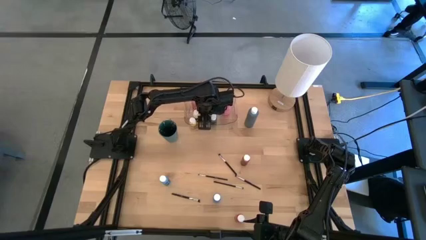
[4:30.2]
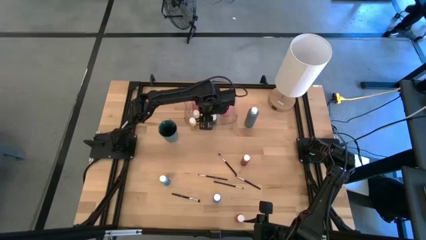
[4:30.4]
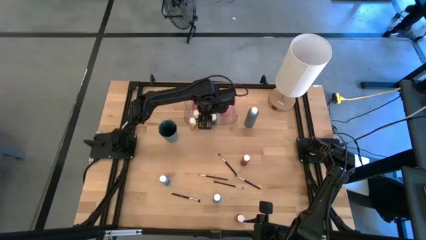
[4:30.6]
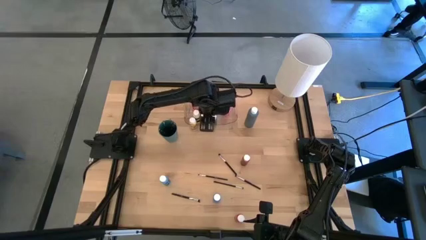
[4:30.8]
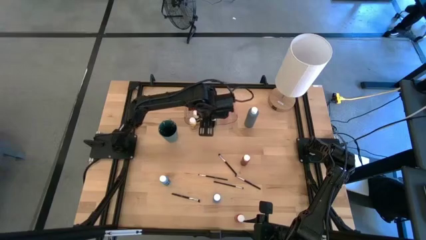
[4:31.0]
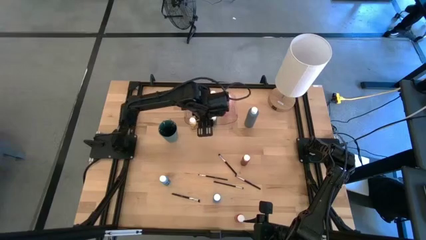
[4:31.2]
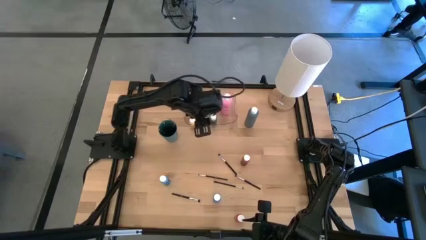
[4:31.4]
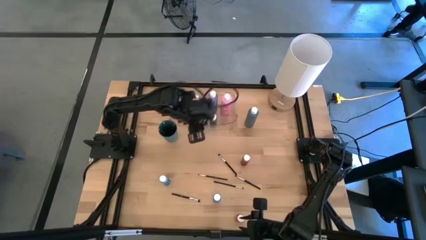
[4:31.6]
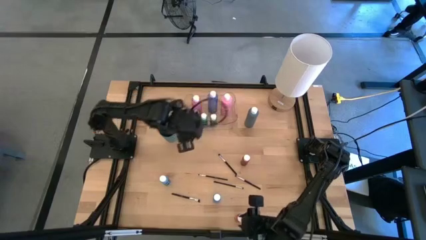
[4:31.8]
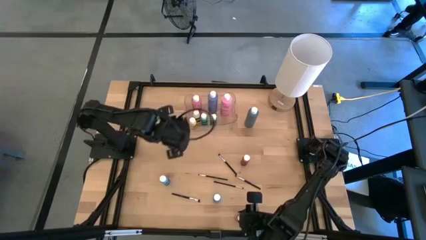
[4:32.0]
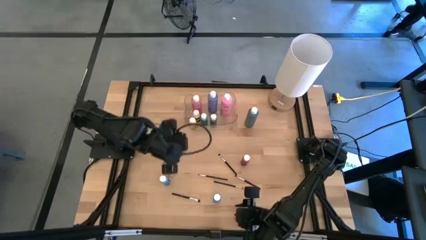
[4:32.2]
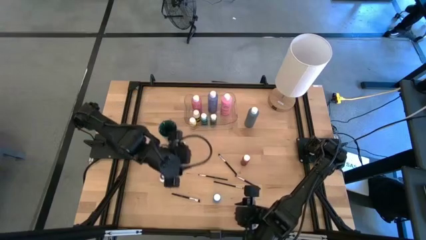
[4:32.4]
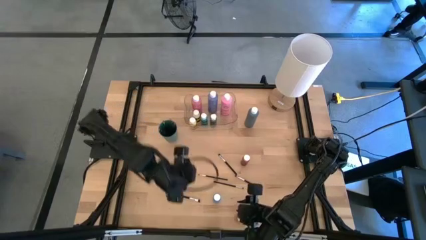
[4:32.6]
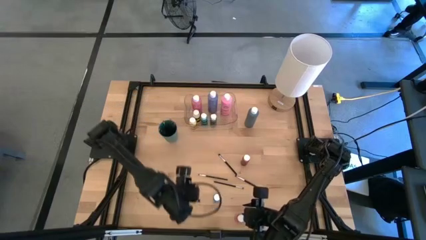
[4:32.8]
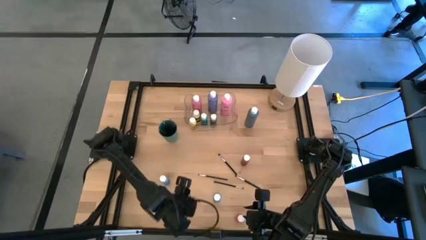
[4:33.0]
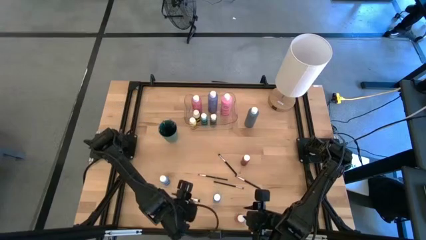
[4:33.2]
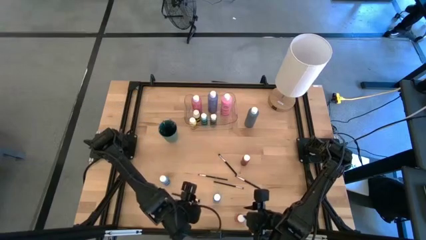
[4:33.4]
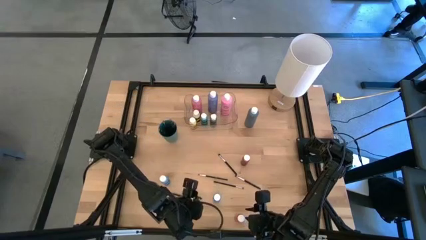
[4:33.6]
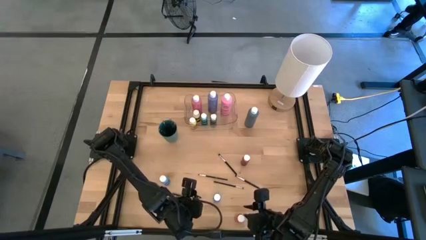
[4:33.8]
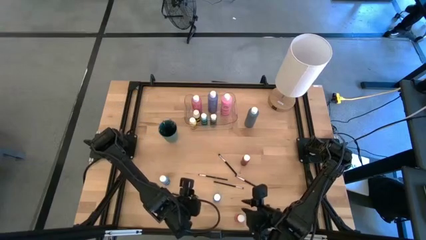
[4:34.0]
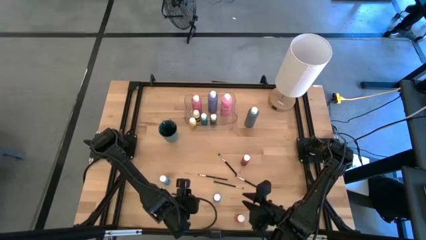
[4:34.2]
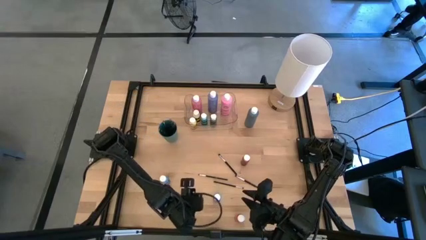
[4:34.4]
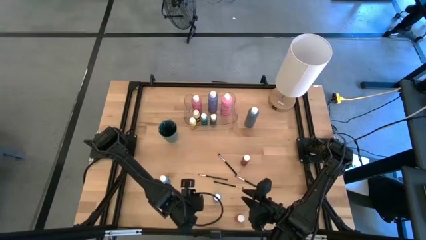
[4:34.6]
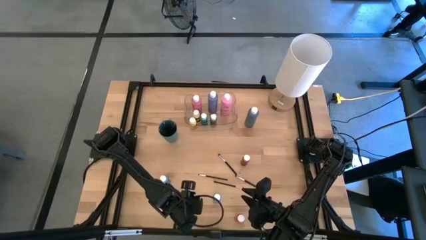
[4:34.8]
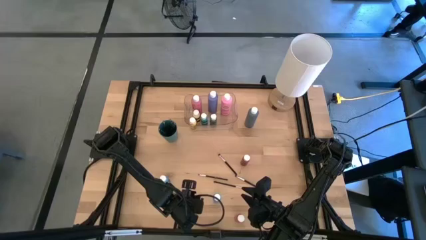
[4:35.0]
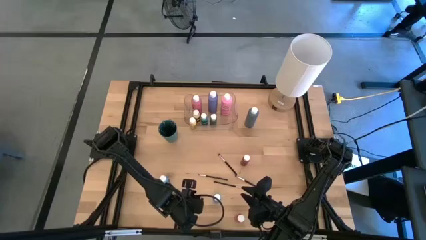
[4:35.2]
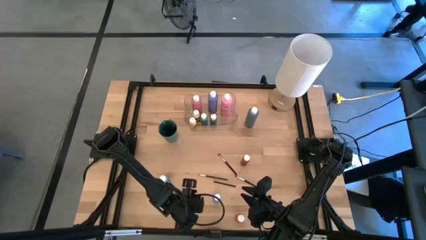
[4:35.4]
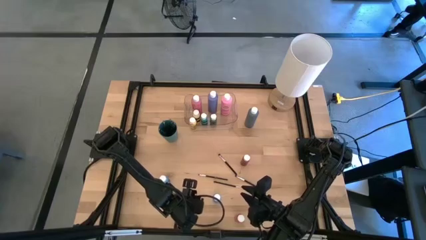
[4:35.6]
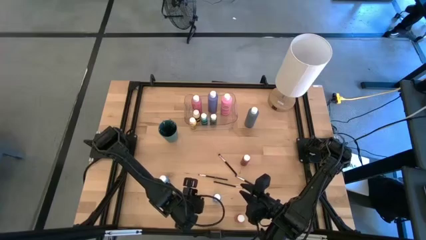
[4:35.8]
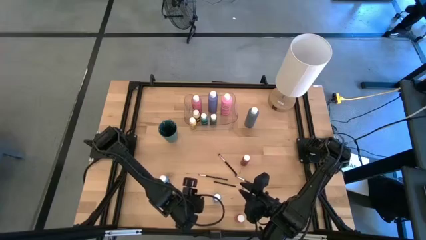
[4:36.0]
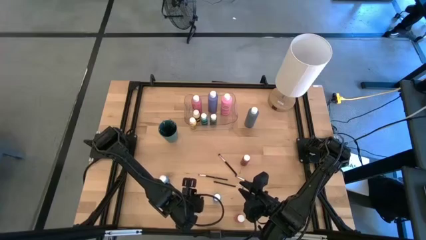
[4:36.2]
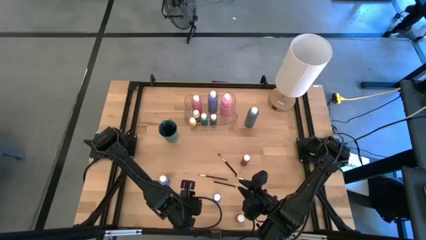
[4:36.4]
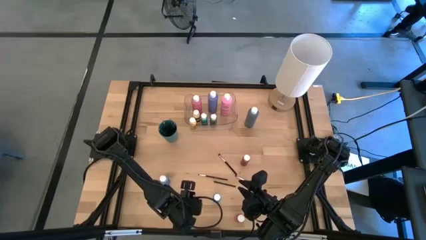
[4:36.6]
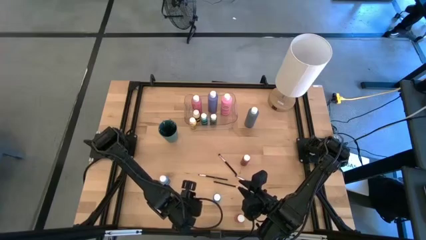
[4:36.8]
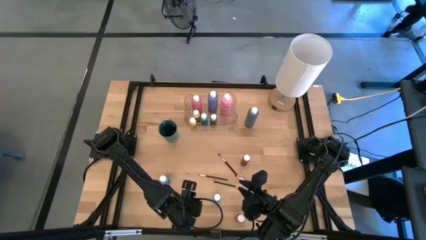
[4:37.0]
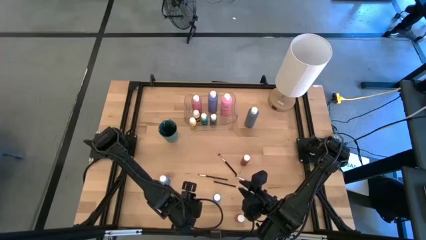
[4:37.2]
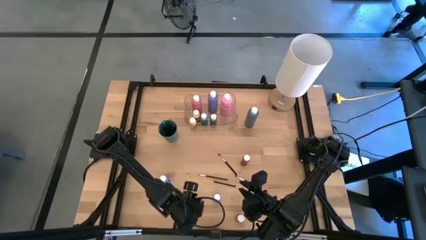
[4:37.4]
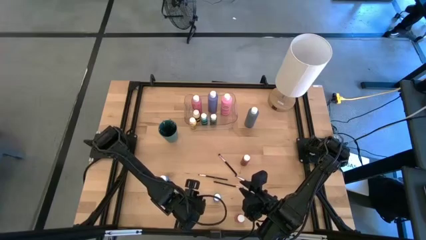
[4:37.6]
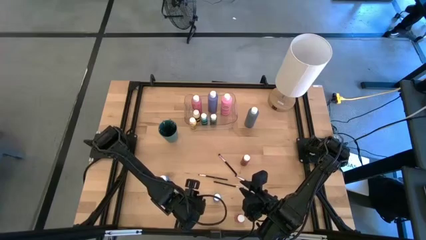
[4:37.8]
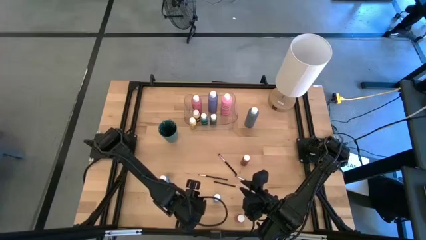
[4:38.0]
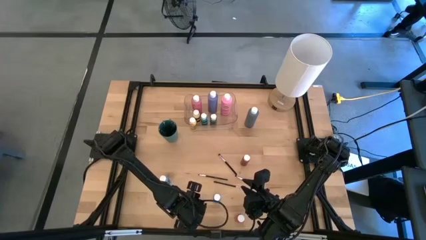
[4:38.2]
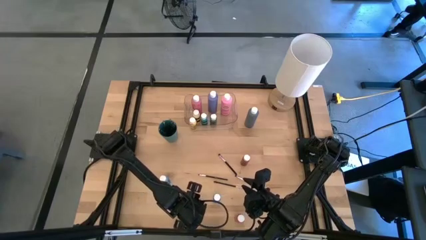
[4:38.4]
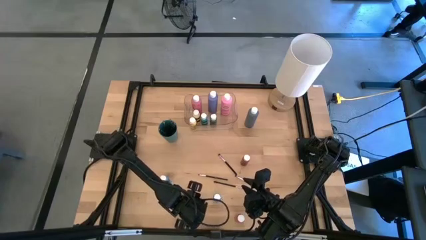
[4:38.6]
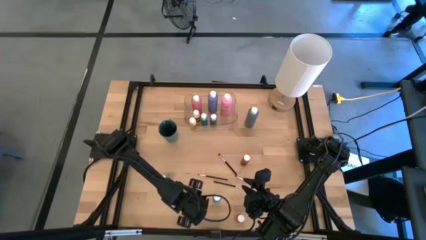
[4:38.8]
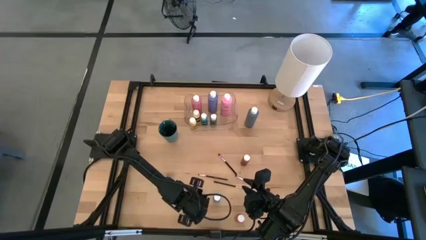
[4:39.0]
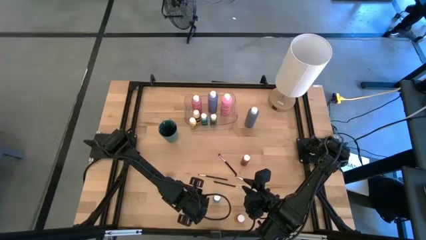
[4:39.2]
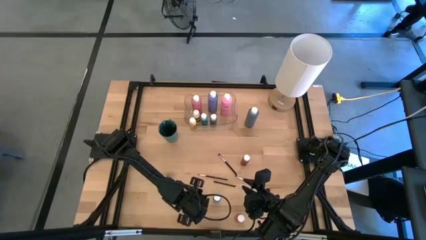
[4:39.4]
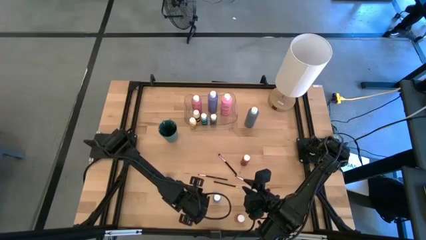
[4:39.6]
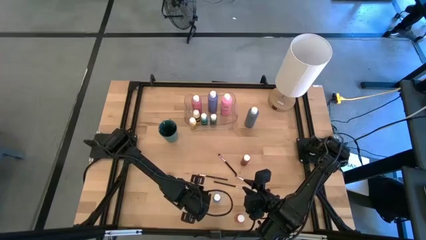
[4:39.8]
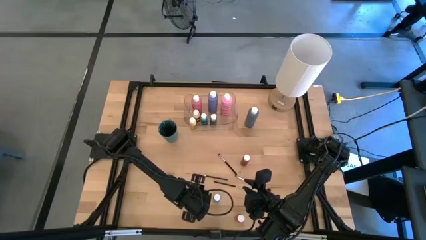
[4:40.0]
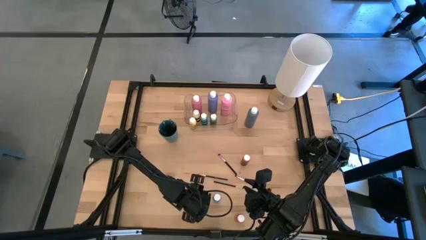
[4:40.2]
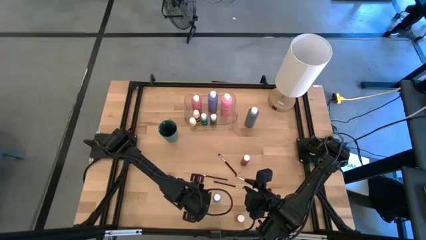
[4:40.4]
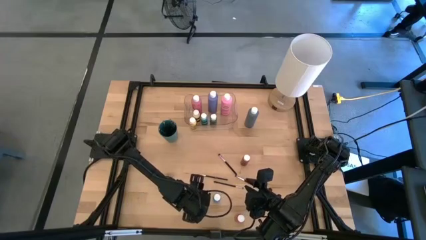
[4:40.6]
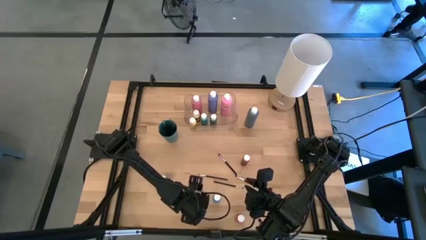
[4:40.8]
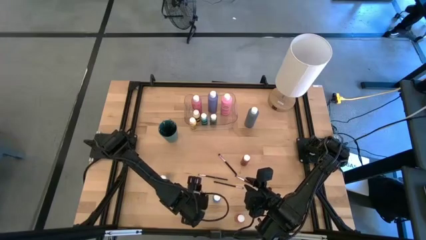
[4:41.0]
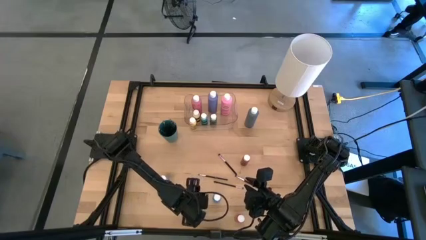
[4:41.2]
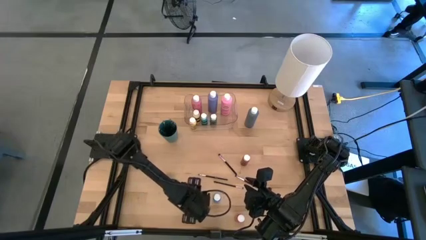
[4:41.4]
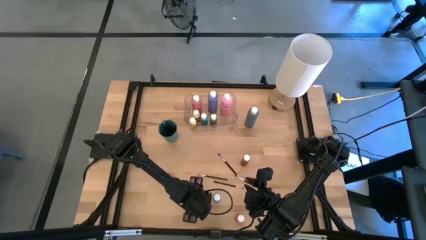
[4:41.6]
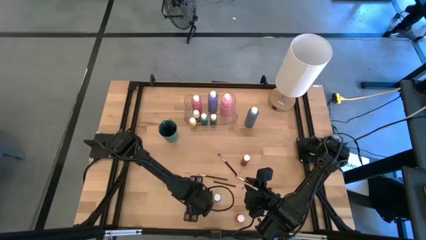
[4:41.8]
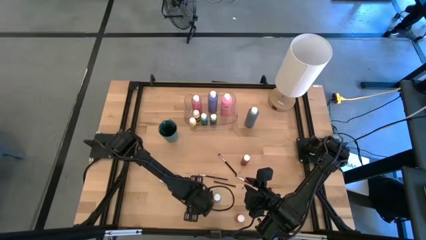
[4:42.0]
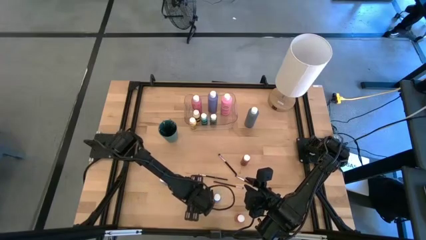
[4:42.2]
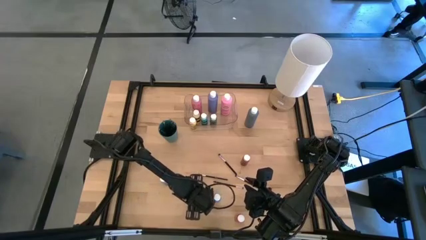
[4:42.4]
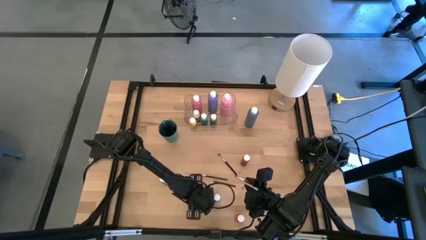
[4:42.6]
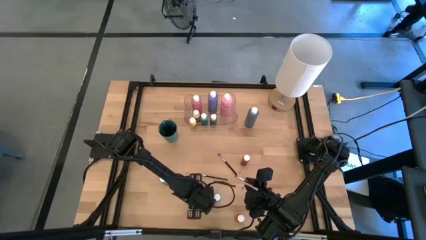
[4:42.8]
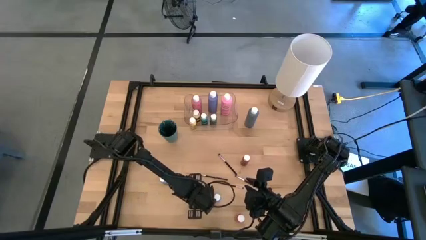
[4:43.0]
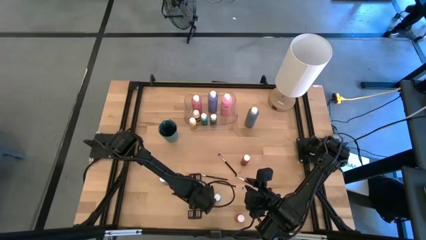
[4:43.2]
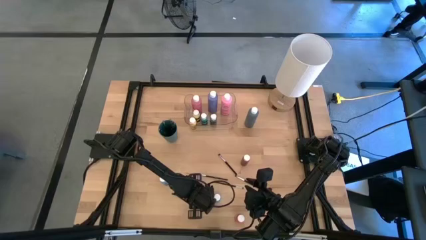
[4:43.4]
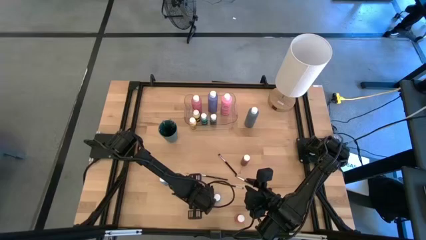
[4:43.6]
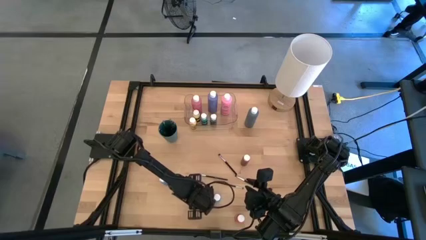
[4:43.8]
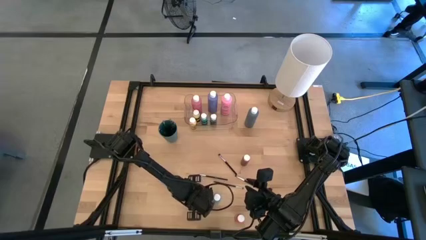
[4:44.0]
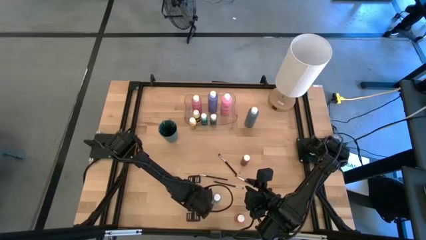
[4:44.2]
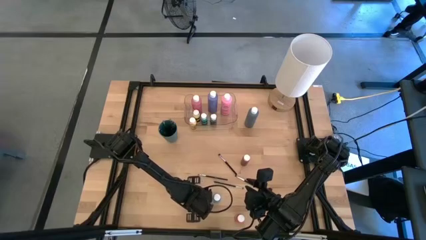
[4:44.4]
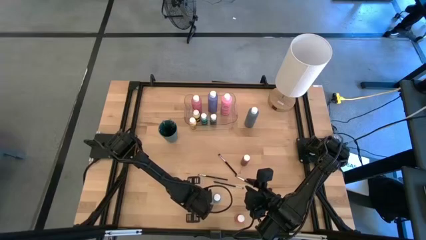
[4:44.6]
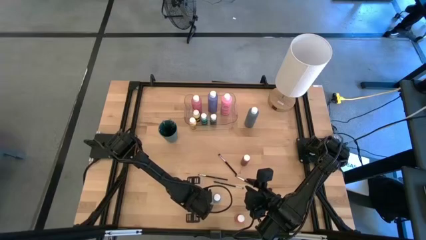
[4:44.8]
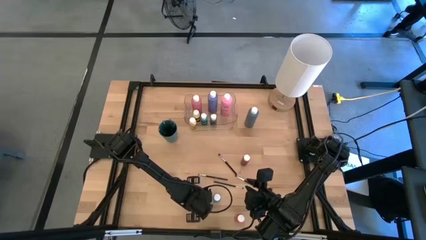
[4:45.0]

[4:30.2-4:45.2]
Task: Pick & Place Paint Supplies
Put the black paint brush into the green cup

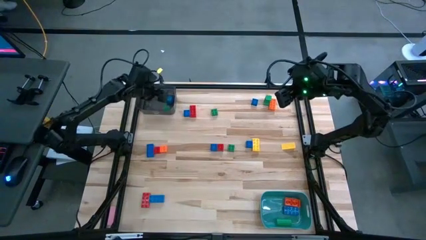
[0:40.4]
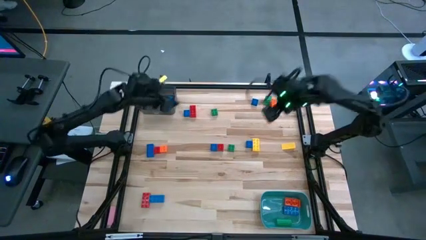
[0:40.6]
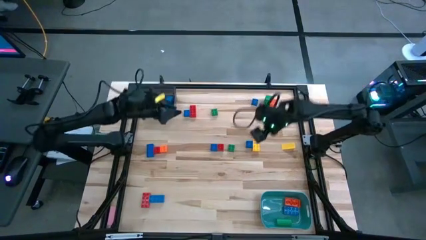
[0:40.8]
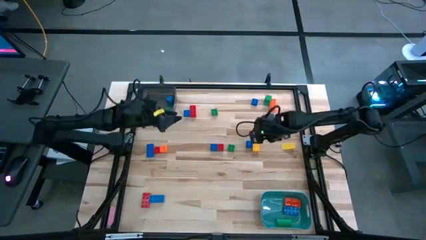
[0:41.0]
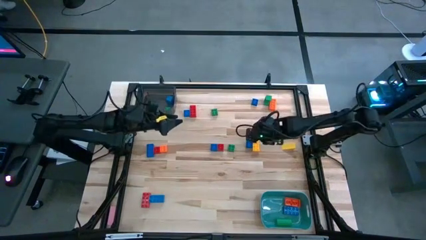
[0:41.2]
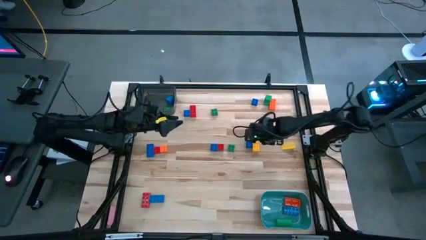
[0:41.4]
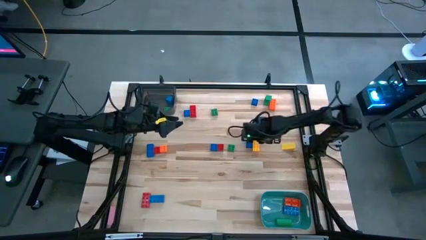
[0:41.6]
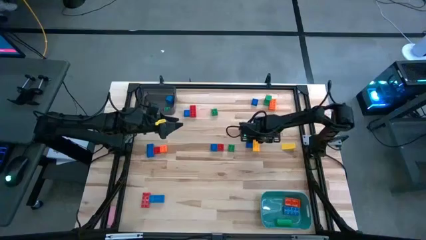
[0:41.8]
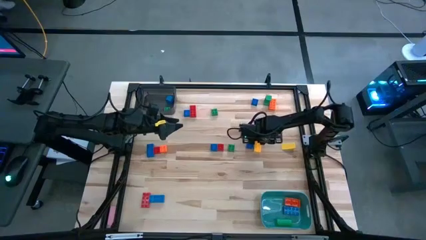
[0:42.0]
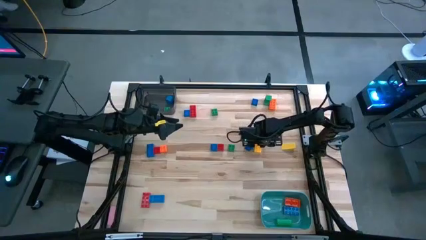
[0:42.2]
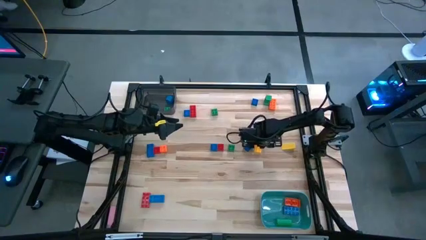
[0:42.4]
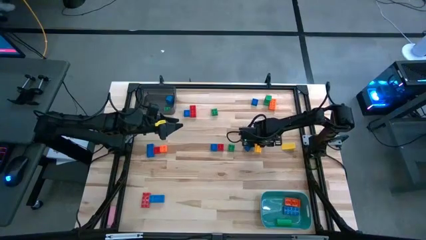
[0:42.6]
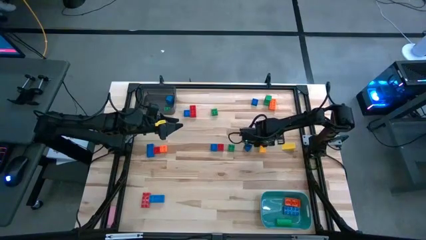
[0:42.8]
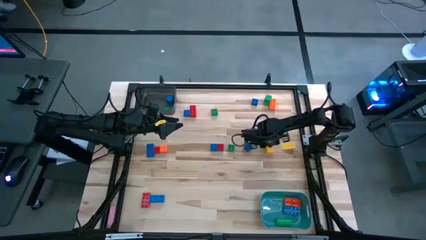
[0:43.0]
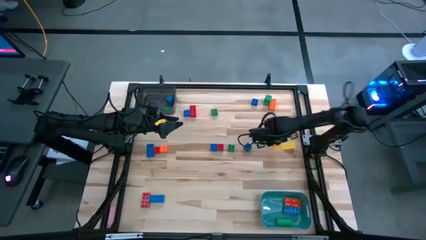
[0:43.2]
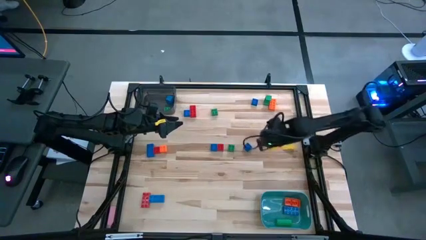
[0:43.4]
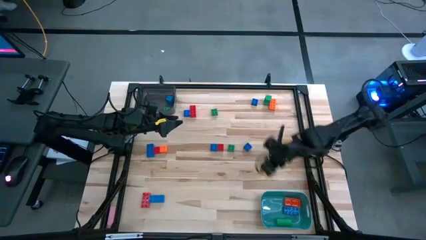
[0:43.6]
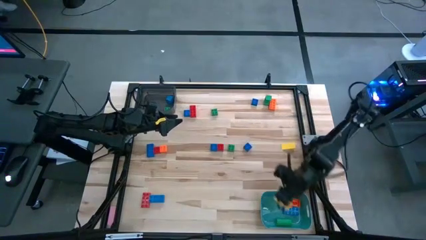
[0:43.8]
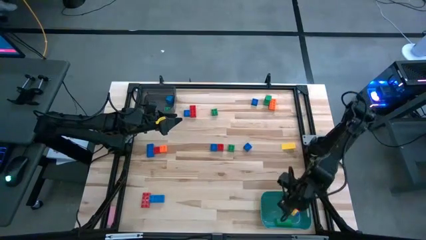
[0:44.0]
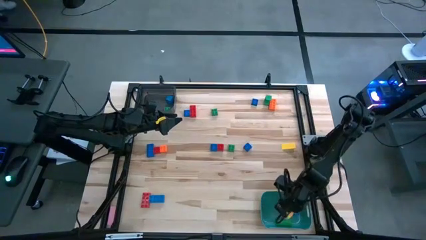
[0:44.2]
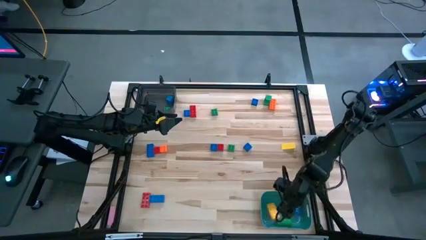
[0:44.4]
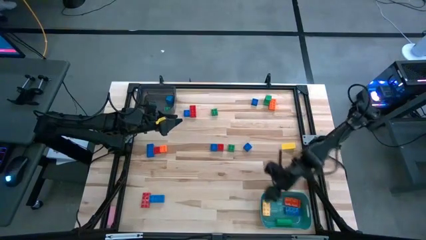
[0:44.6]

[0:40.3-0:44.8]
Task: Sort blocks by size
Put the yellow game piece into the blue bin
